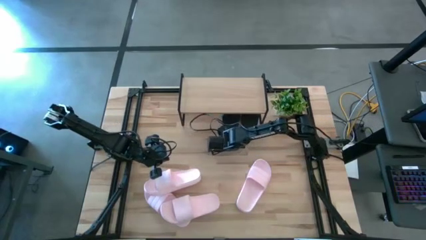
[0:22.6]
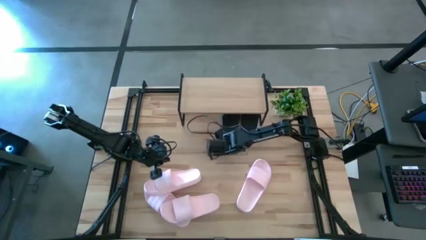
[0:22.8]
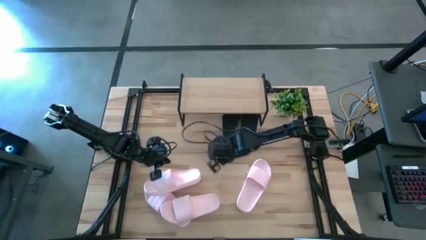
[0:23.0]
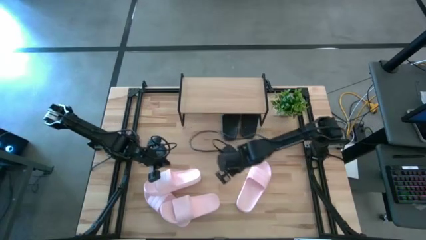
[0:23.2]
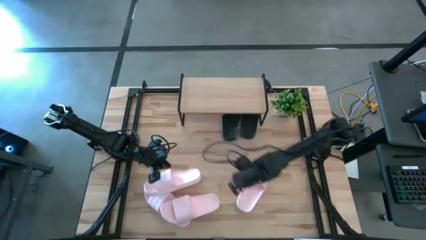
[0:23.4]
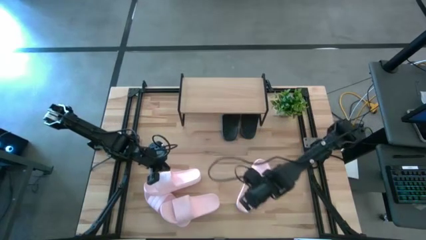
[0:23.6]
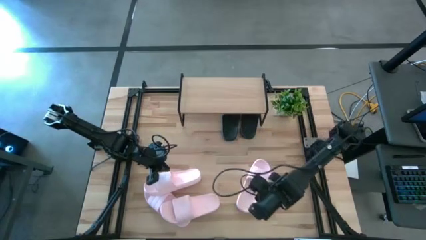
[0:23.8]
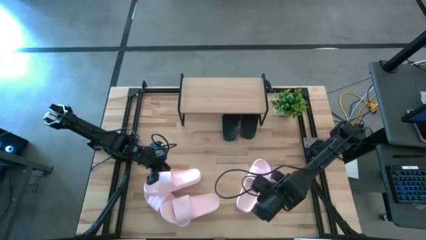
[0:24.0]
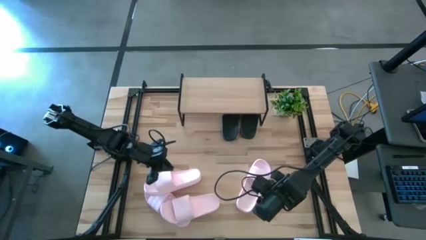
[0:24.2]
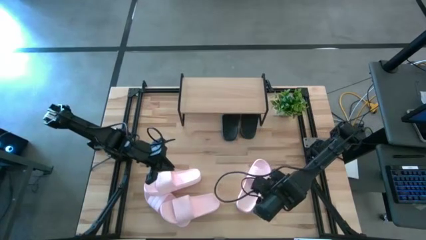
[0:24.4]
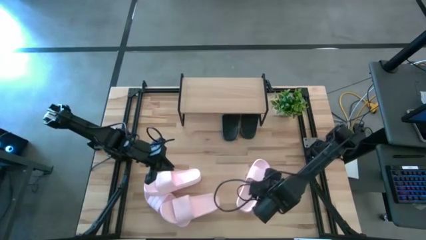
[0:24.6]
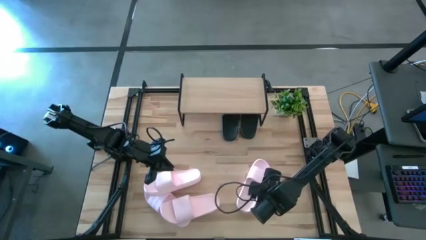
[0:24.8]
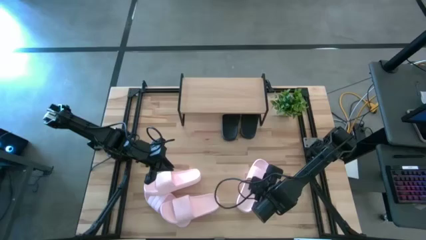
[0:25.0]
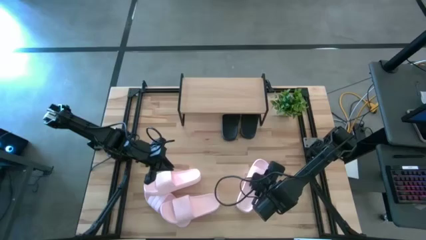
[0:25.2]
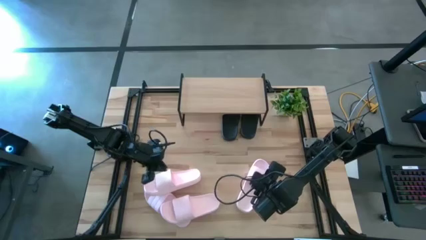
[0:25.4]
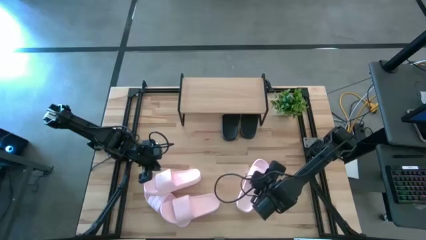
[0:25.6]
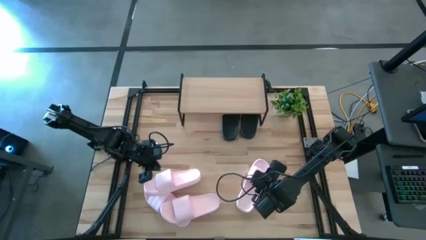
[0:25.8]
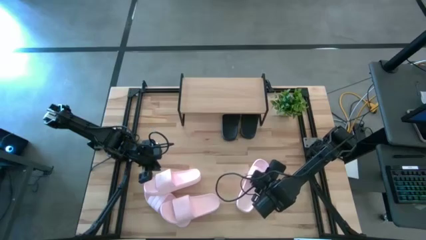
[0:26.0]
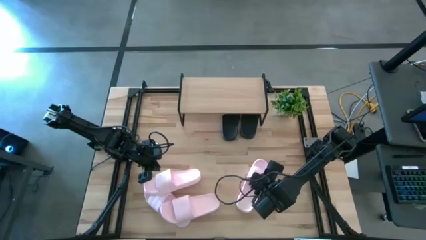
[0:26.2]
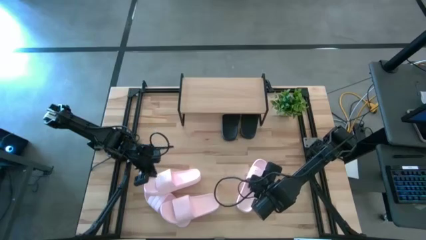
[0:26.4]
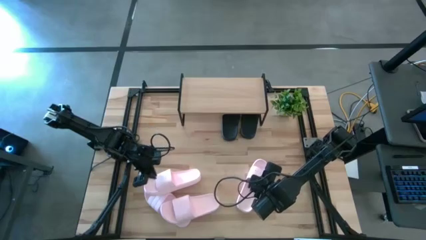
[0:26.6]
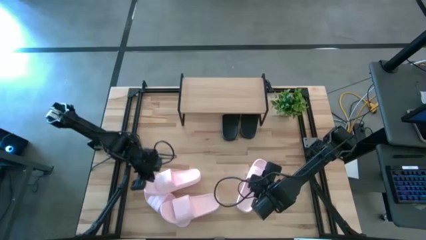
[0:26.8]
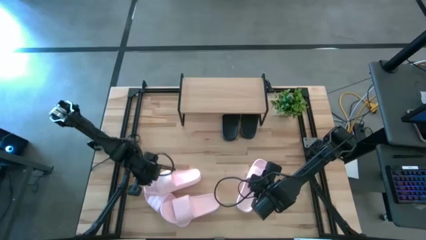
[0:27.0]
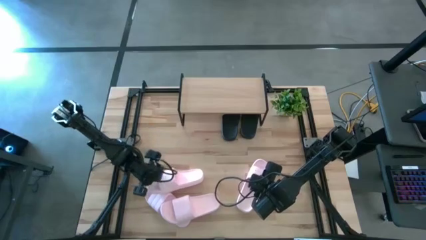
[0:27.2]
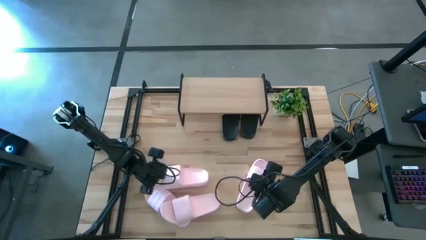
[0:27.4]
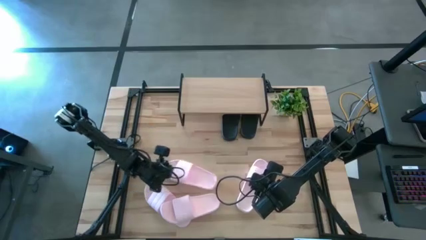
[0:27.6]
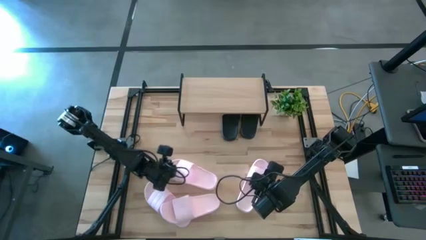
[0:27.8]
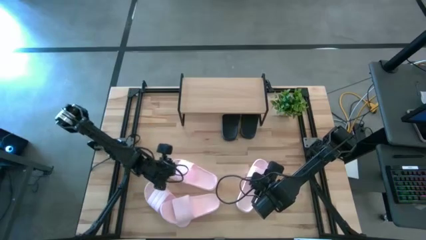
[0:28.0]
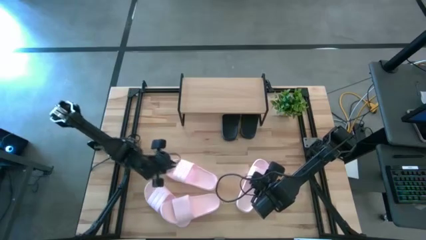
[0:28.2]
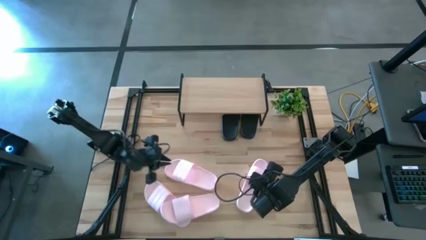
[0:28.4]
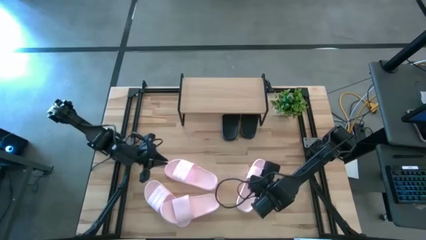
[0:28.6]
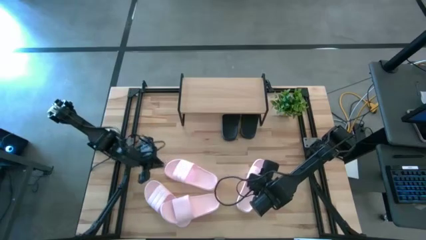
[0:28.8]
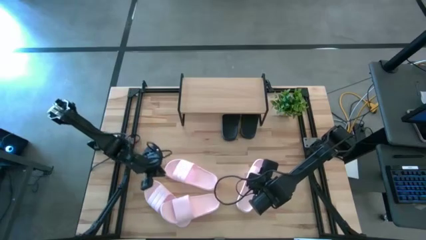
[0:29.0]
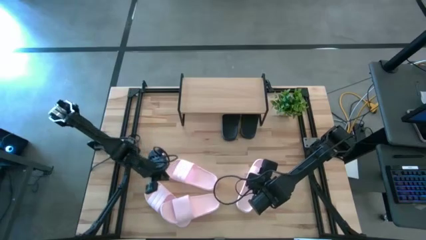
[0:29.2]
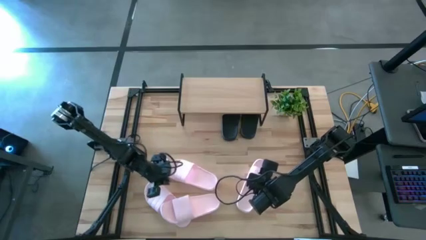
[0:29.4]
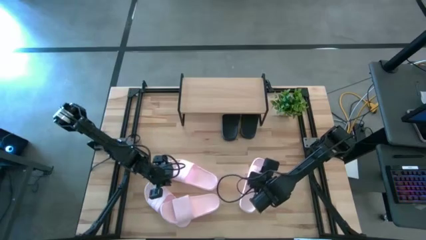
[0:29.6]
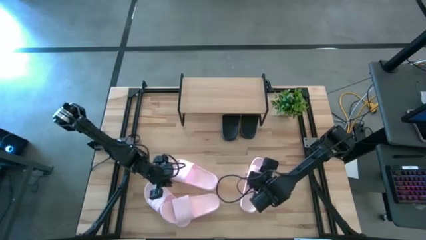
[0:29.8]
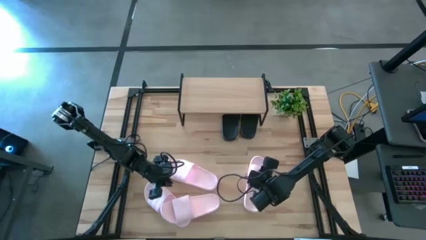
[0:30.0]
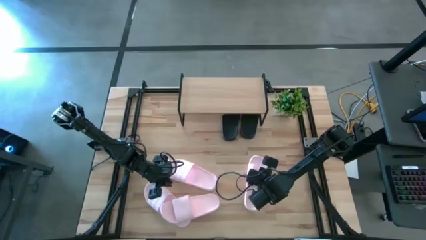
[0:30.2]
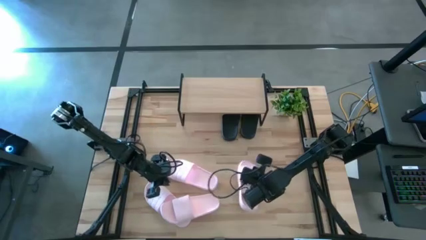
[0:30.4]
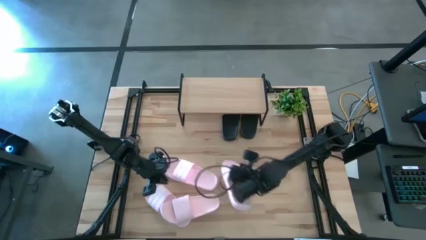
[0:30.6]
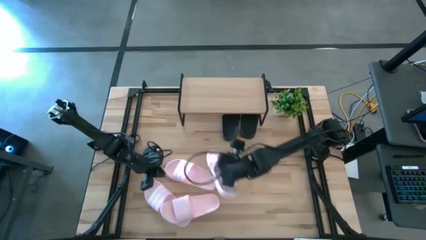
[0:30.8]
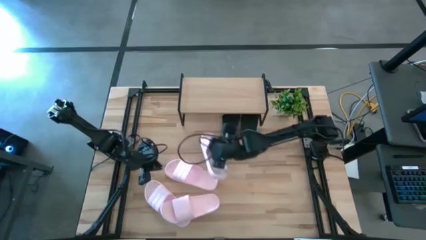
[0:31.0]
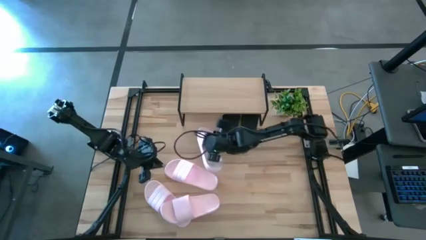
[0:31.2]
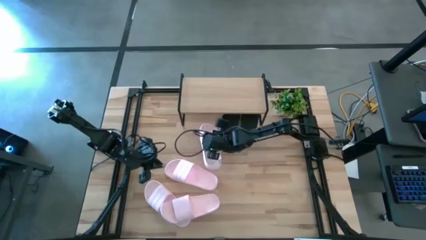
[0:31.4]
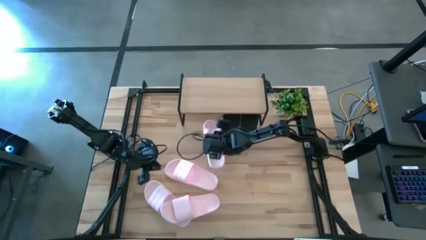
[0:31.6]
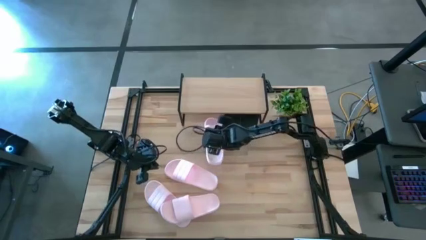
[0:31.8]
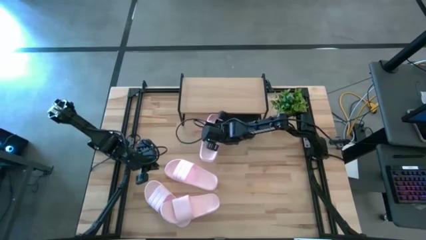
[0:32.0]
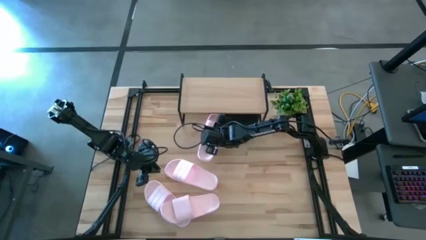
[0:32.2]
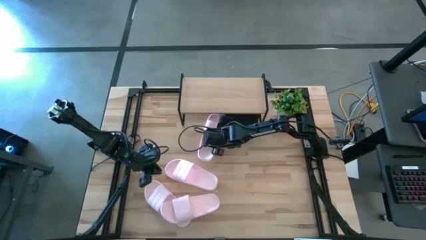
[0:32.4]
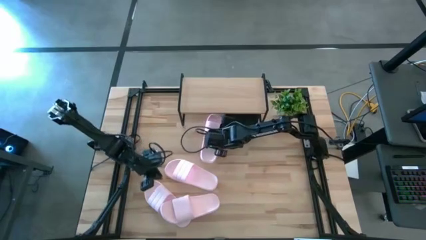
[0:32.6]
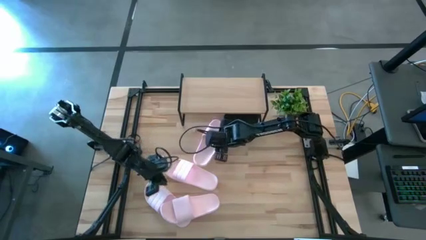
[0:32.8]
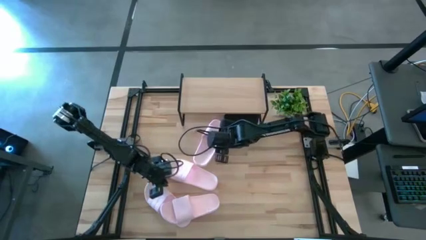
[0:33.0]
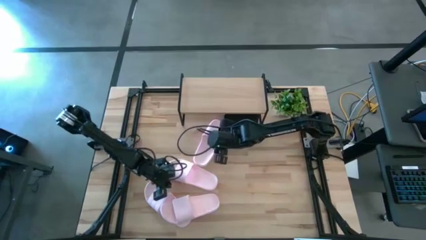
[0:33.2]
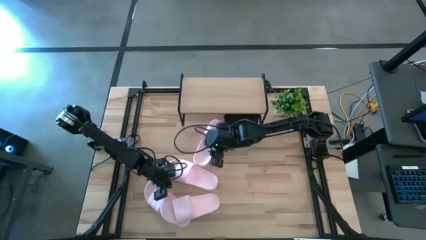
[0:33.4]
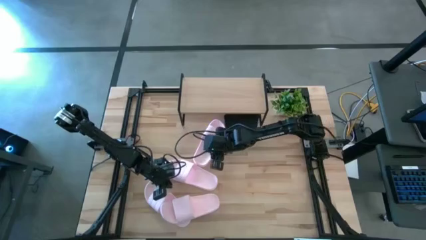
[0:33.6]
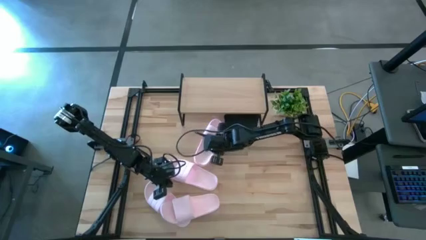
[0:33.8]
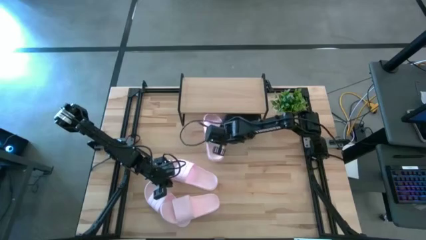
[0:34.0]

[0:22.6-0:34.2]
Task: Pick and place slides into the shelf
Put the pink slipper under the shelf

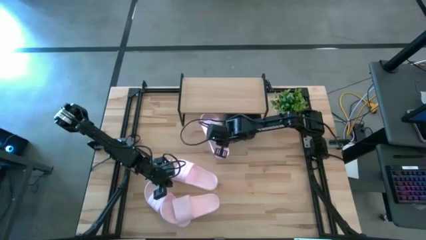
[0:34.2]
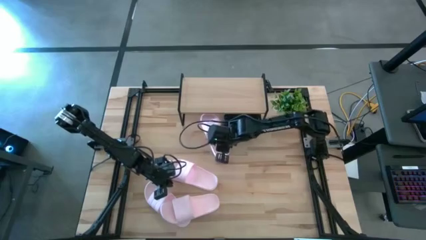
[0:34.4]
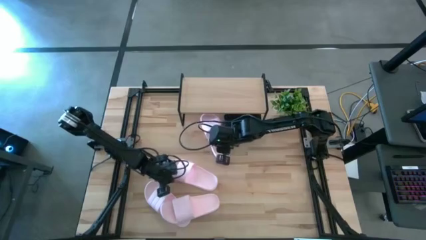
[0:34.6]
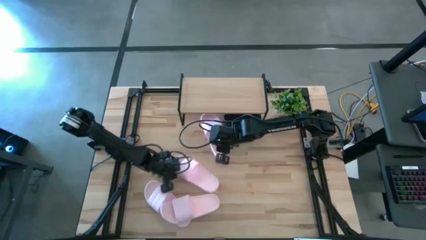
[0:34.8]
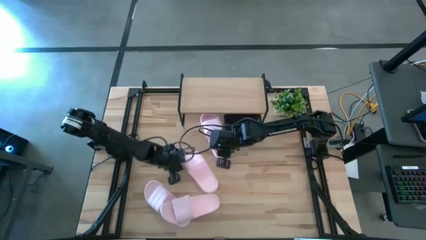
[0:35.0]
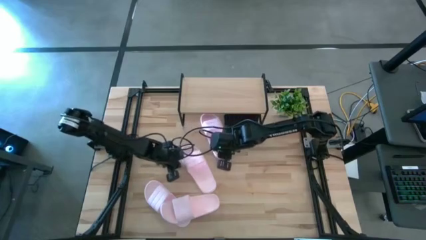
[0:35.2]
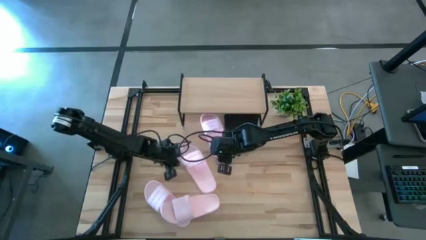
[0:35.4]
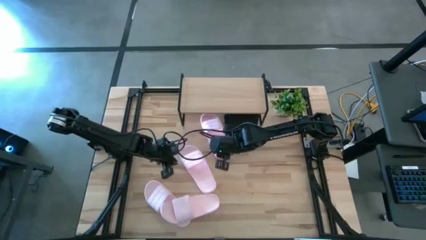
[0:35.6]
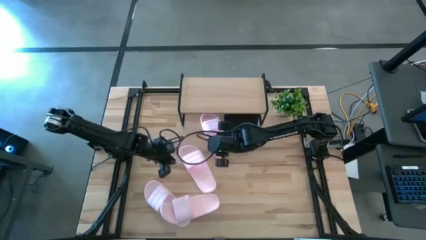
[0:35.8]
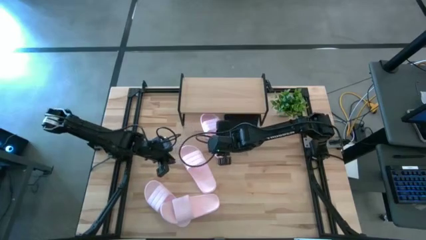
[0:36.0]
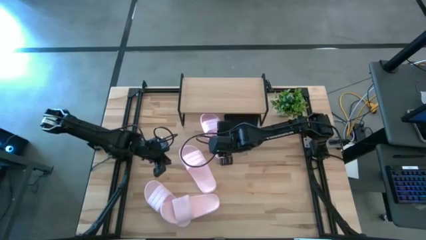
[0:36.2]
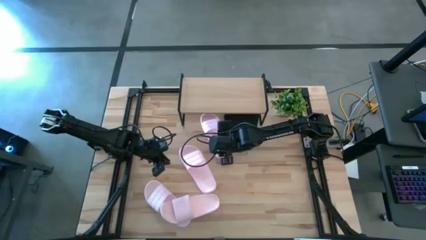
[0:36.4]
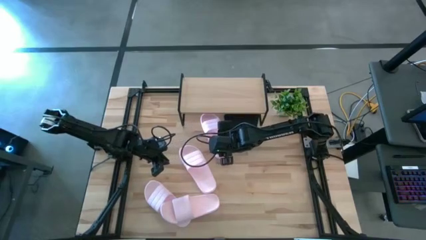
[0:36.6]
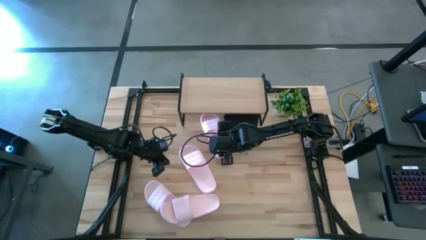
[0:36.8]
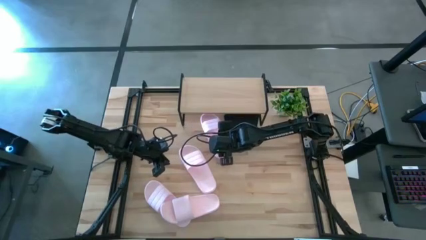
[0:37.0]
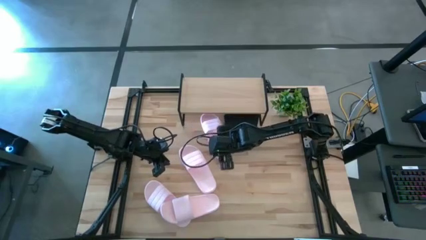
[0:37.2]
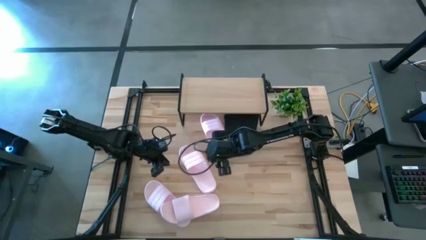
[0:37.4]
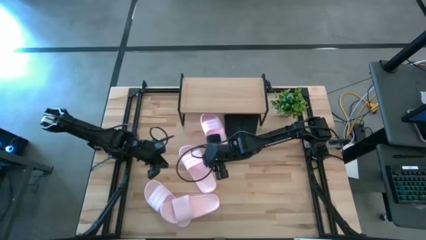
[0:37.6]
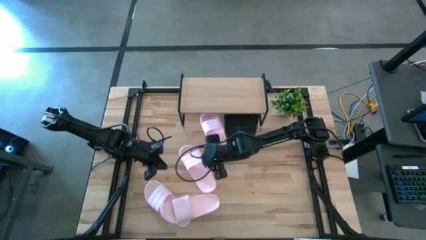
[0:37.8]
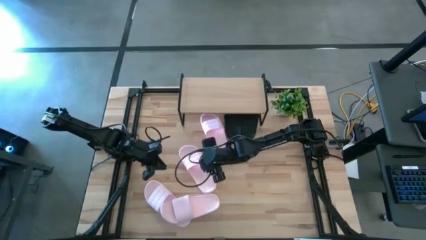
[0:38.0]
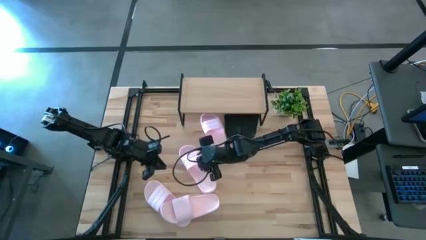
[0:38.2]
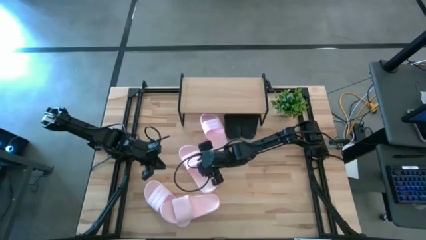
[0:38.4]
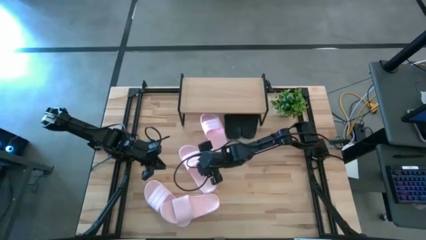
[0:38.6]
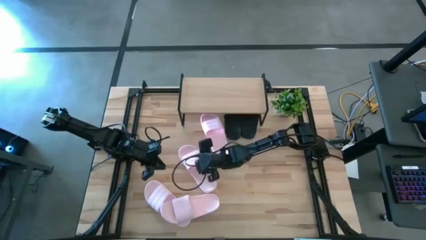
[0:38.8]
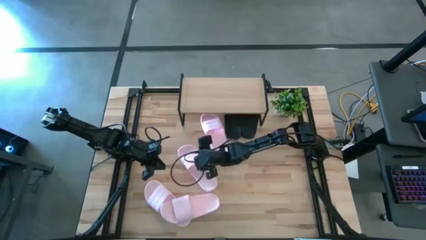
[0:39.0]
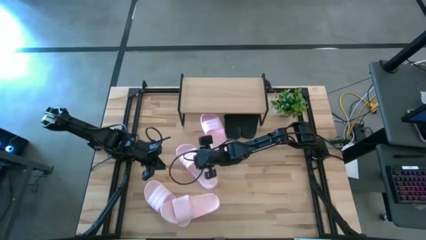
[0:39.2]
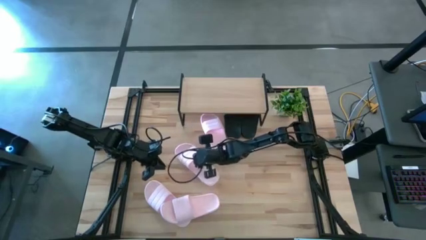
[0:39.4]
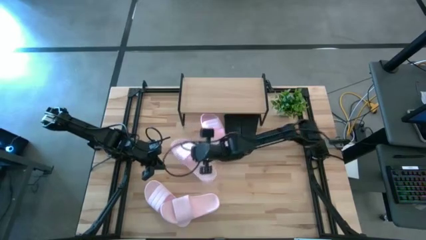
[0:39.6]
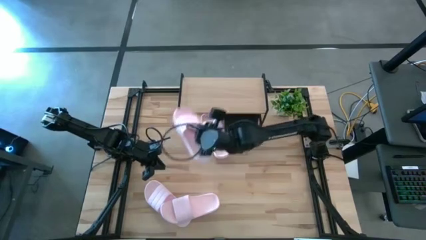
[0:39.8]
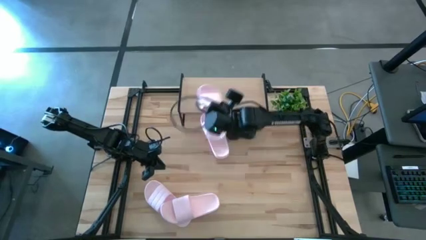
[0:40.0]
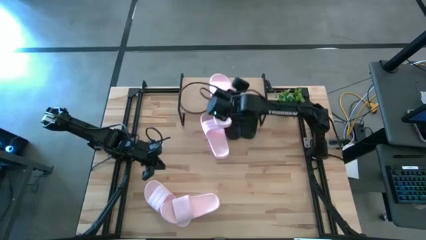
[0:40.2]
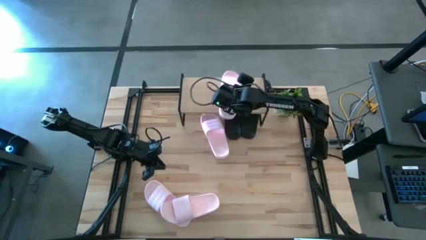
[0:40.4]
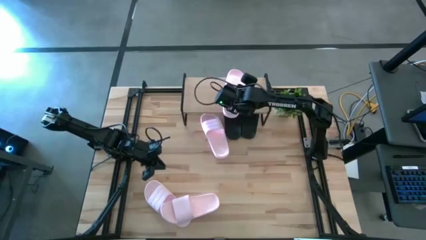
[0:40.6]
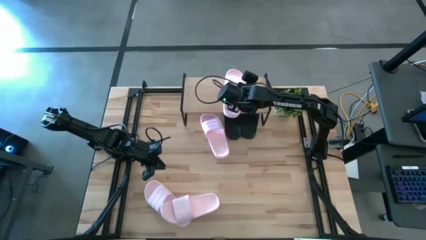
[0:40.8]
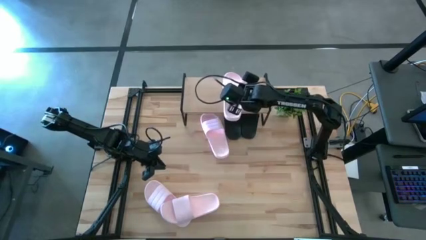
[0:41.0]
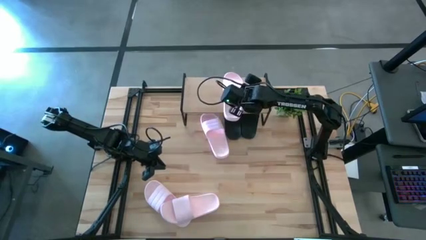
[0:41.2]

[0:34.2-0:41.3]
Put the pink slipper on the shelf
